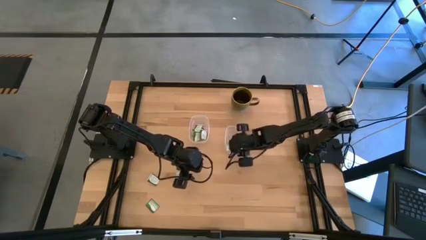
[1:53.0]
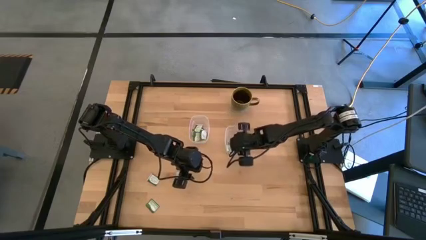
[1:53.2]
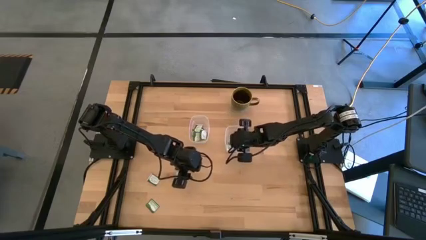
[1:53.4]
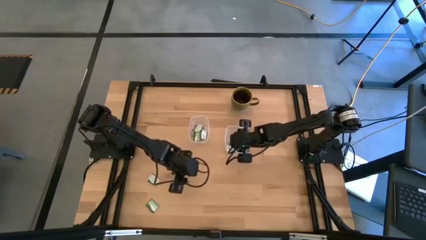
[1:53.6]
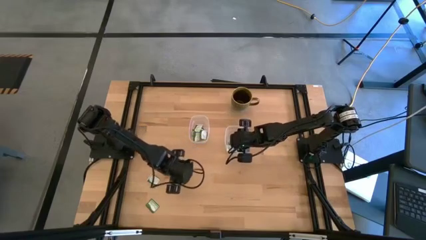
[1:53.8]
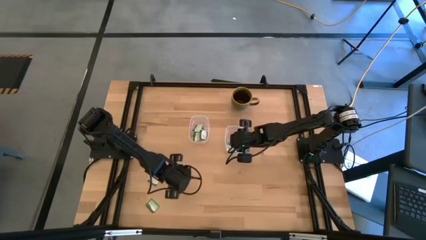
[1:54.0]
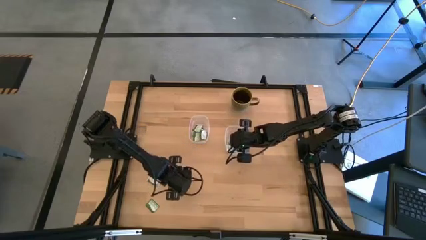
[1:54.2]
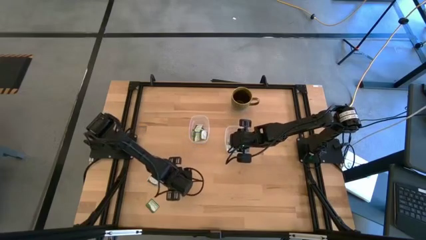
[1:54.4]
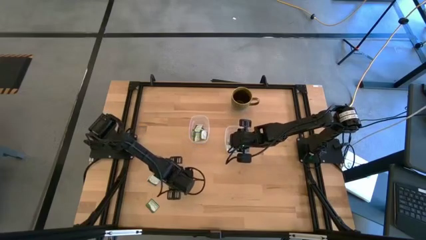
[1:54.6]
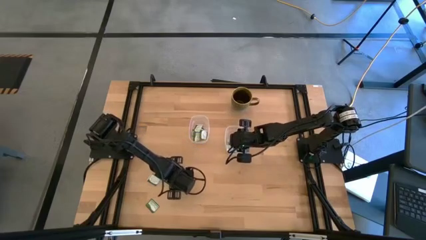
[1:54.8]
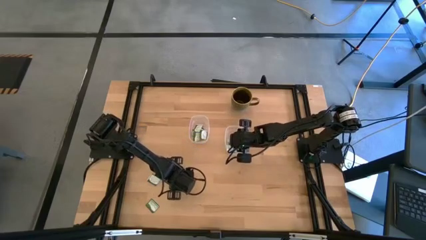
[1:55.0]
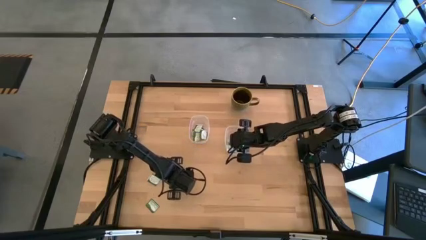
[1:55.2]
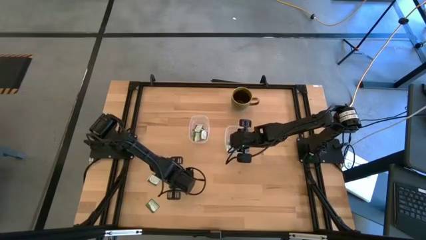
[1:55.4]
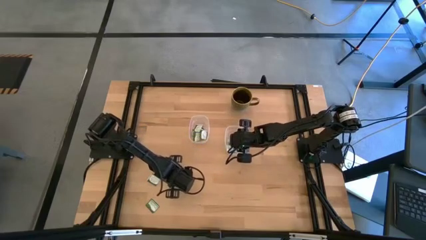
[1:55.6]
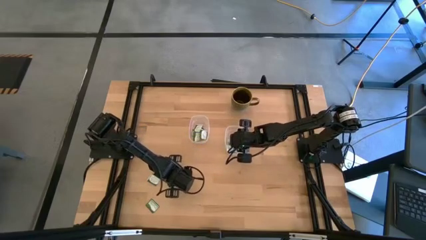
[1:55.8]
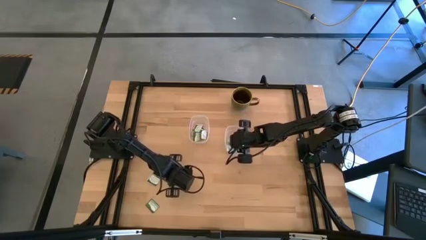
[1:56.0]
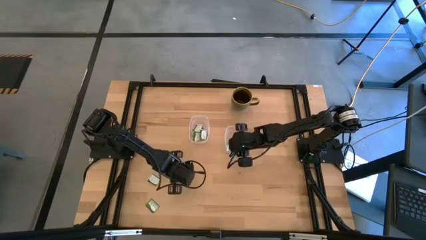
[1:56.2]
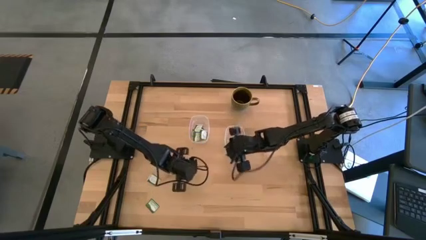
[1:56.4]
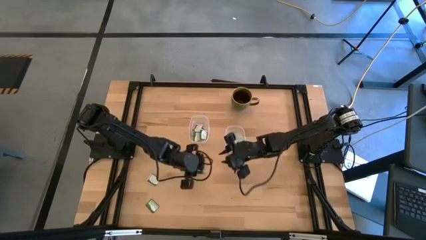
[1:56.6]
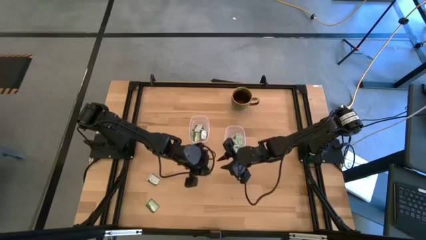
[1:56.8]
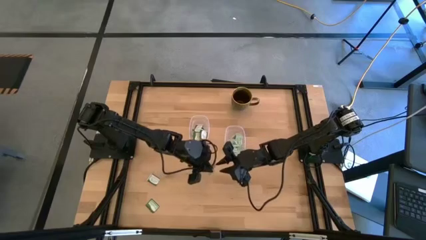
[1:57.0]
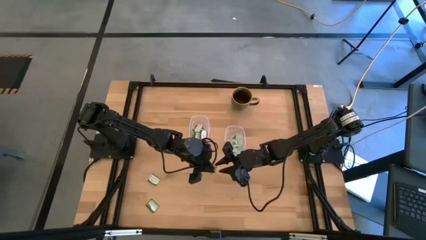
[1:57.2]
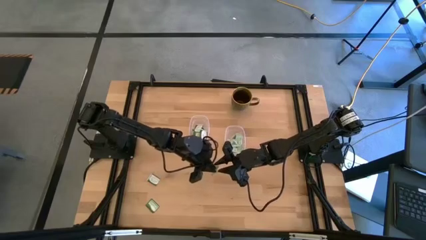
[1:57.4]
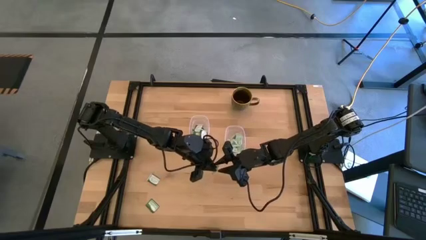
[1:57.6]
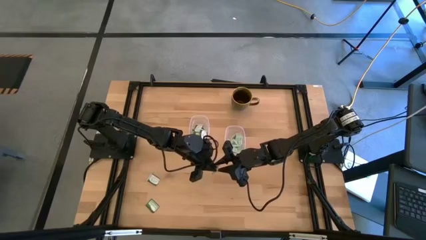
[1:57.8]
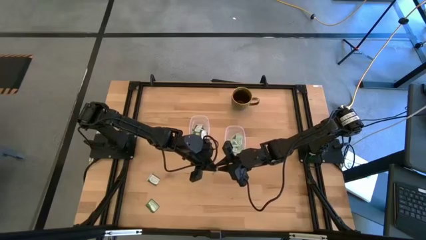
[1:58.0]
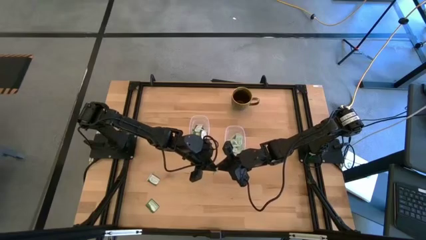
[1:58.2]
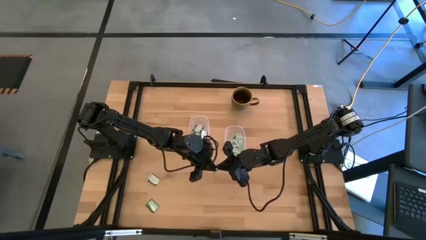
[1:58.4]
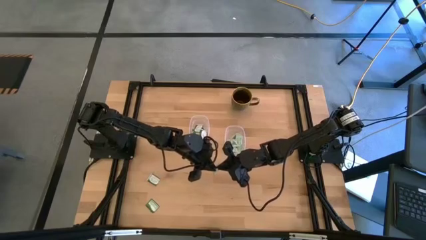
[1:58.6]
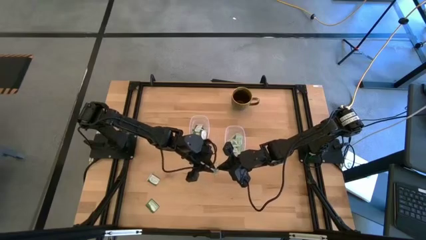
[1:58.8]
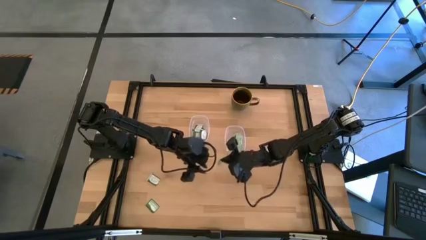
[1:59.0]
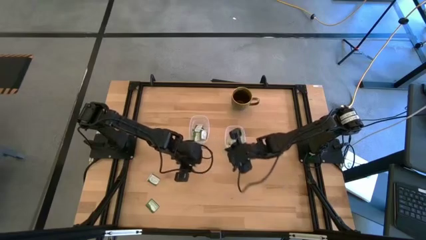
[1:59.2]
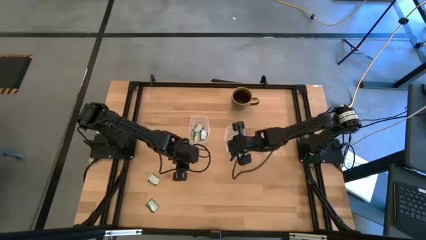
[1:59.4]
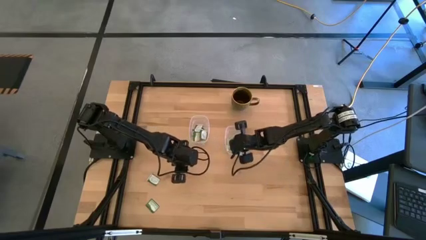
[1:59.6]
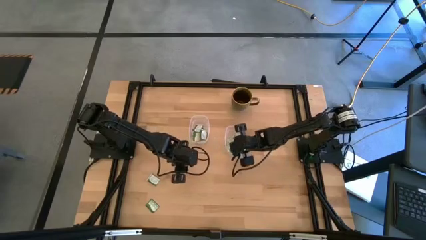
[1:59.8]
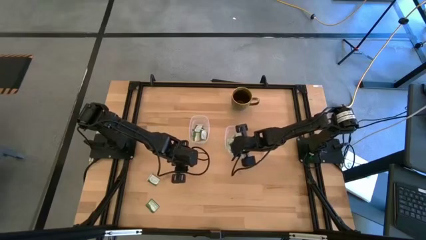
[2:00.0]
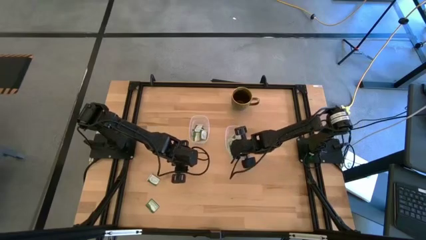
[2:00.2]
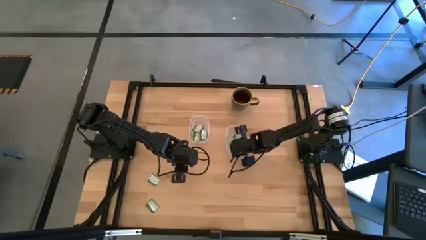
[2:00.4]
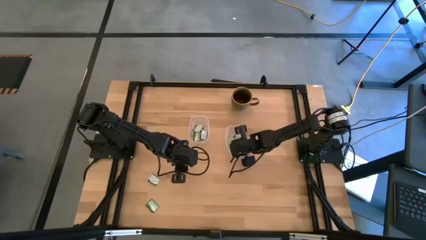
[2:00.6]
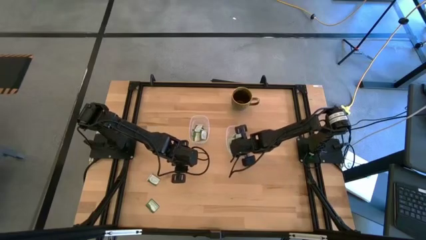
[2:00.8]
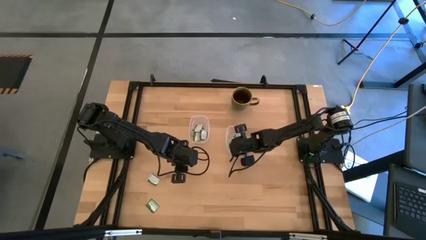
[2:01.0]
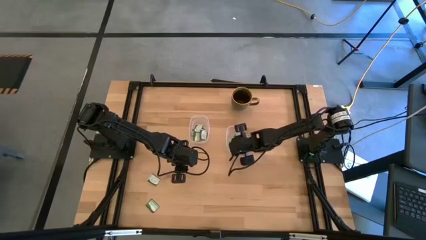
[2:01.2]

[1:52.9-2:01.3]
Task: Pick and place items into bin
Put the stevia packet into the right transparent bin

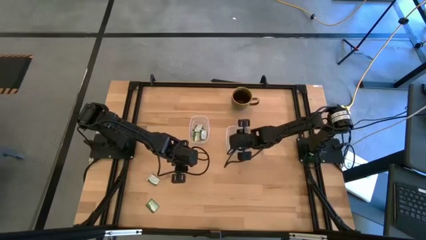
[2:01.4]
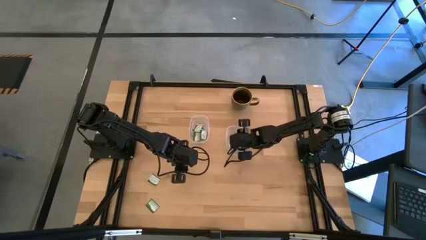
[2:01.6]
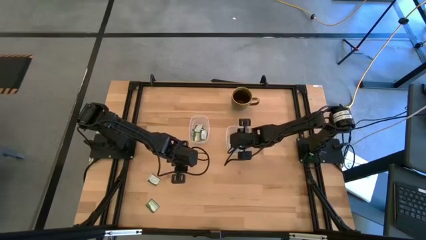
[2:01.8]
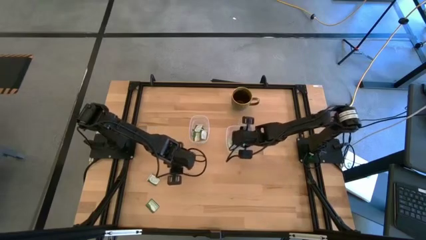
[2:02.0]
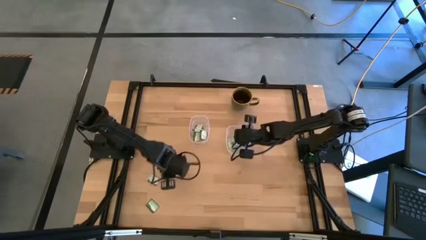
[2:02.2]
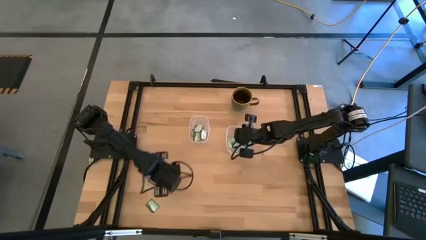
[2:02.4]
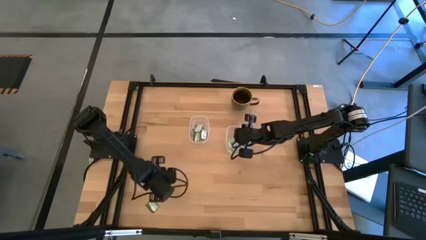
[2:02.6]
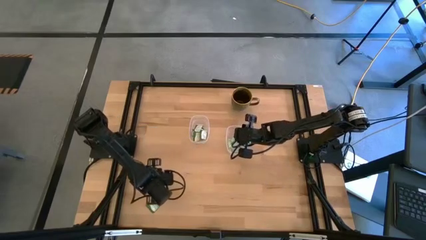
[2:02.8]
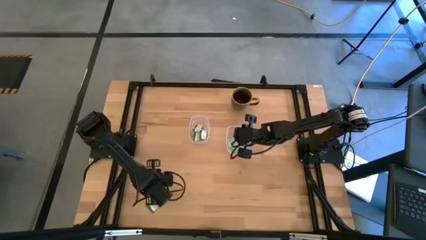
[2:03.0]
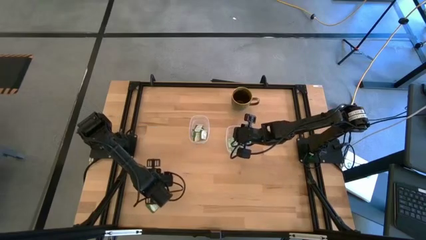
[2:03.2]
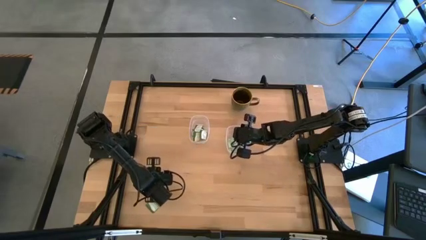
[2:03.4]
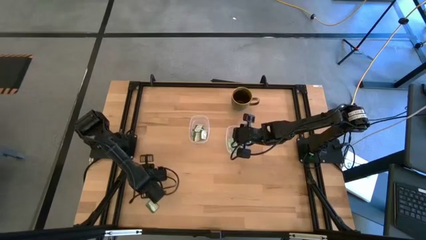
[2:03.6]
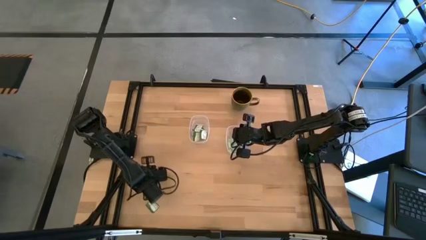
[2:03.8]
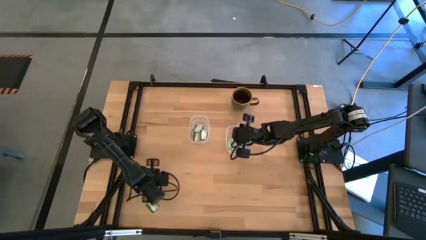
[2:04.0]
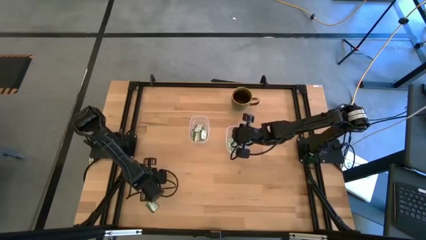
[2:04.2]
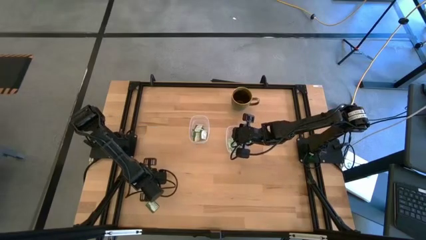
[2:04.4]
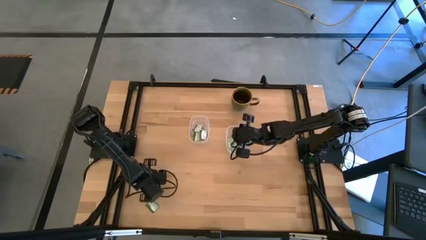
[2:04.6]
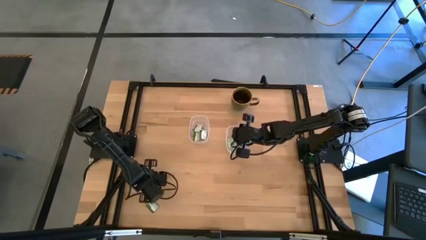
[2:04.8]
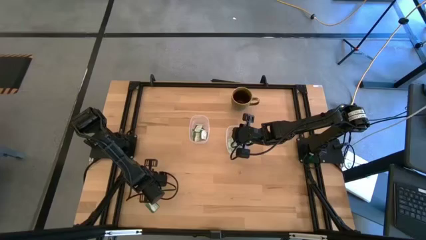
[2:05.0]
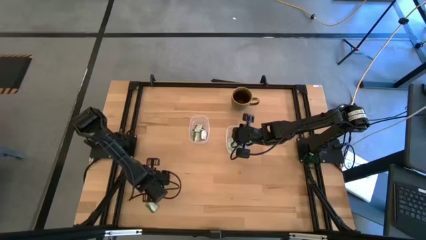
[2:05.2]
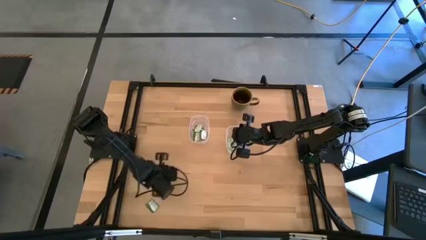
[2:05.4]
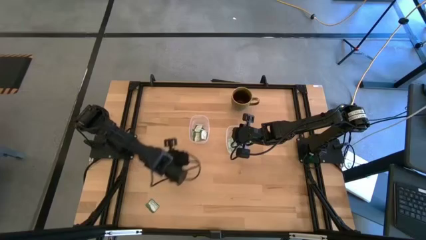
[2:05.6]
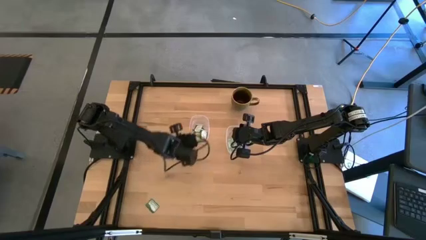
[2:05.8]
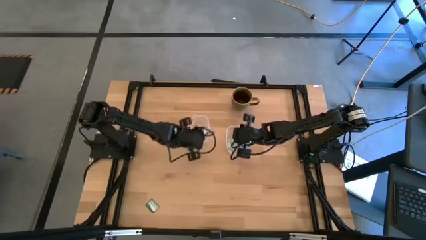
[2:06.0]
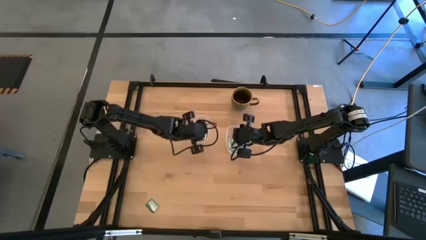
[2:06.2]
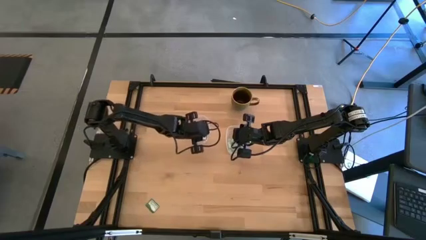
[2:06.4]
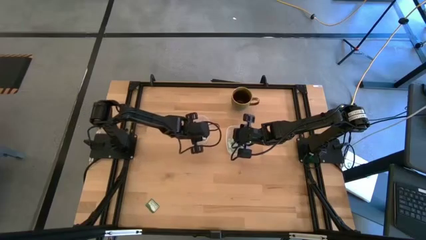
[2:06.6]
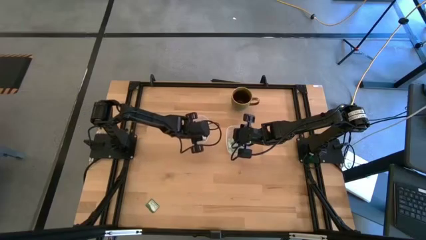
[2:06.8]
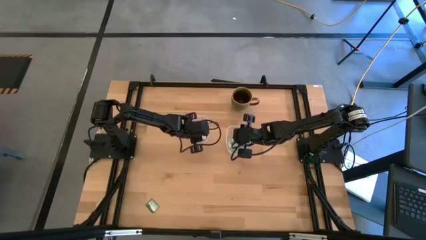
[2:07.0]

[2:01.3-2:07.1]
Put the truvia packet into the left transparent bin

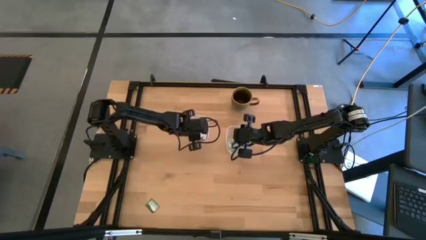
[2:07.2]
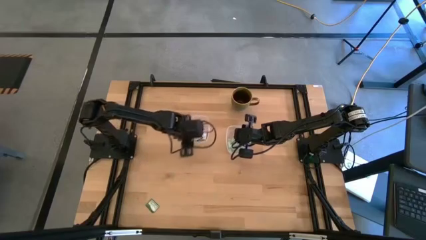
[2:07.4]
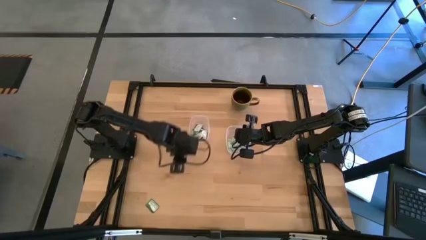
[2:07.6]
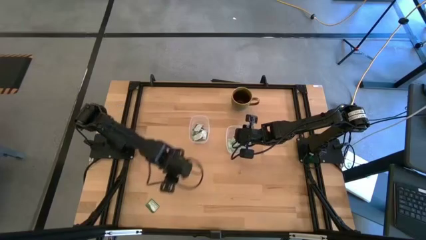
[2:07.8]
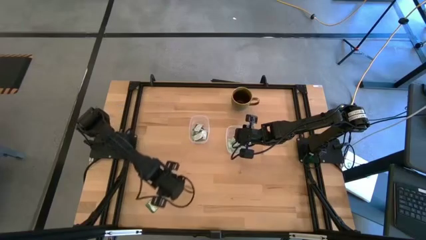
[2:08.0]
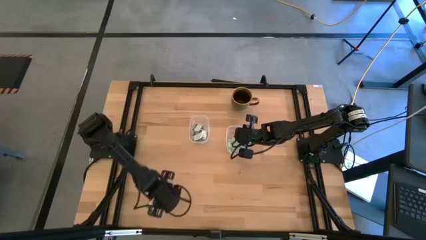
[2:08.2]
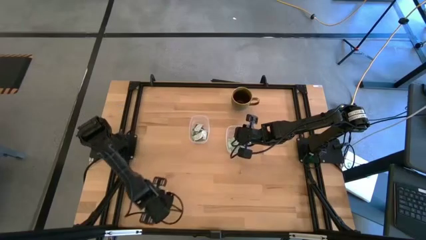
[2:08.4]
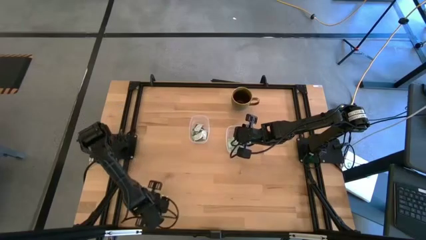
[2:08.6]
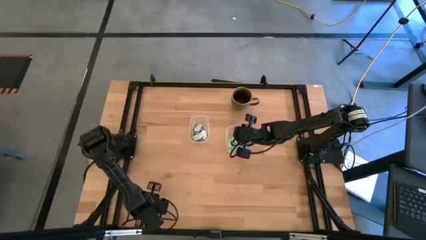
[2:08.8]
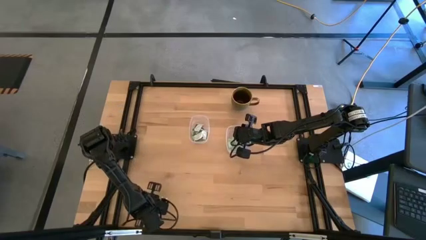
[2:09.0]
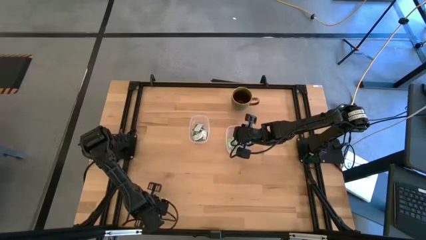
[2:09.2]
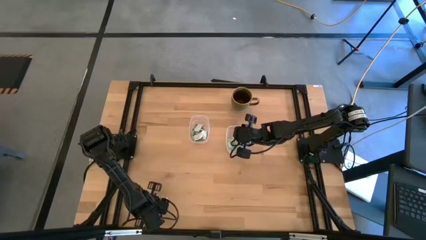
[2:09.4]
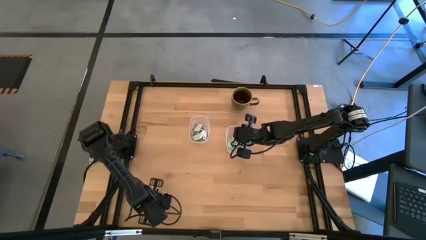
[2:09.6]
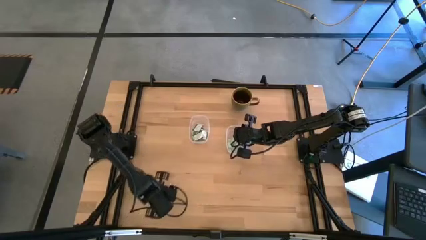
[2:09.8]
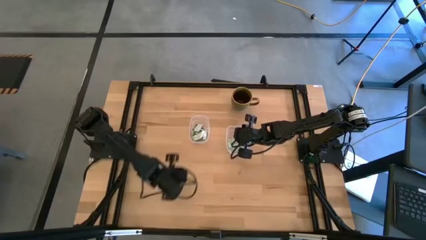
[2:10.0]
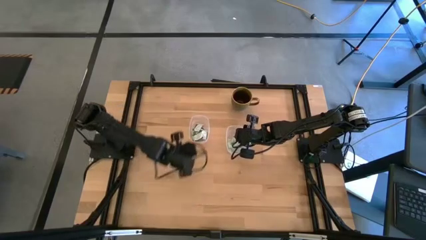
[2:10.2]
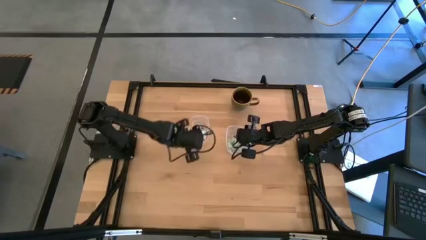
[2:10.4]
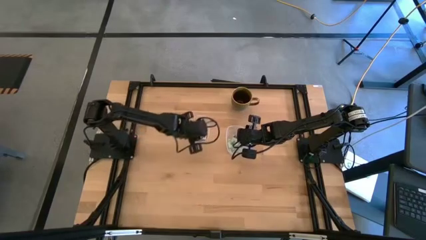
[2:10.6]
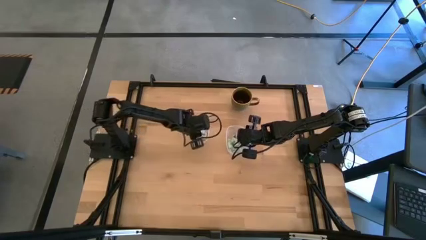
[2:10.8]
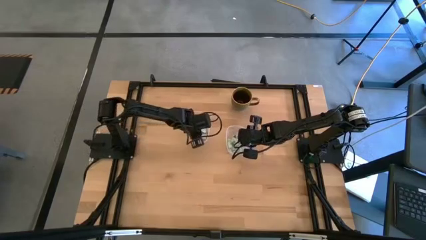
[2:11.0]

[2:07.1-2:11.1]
Put the truvia packet into the left transparent bin
